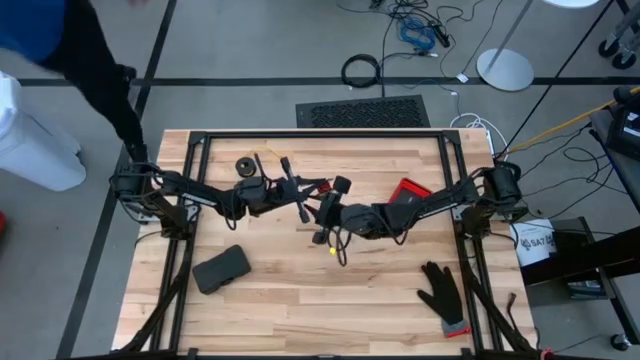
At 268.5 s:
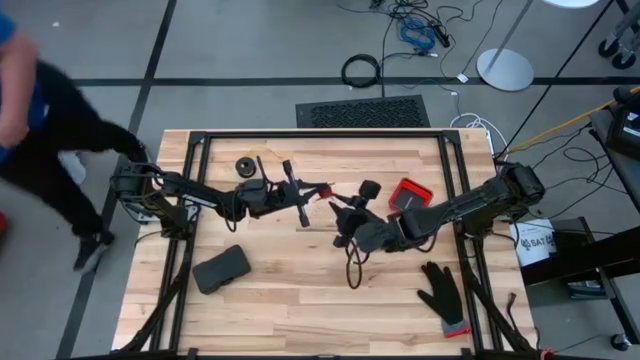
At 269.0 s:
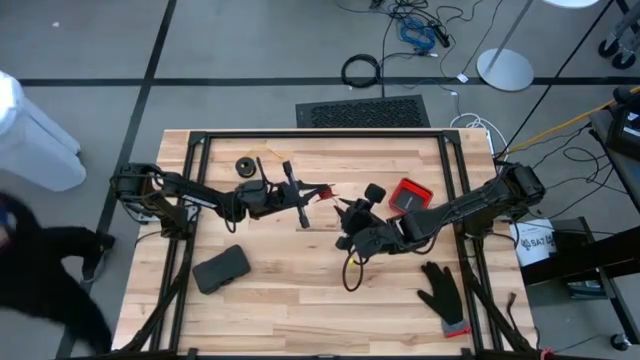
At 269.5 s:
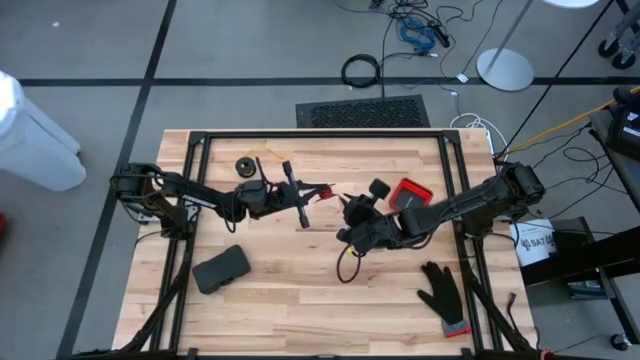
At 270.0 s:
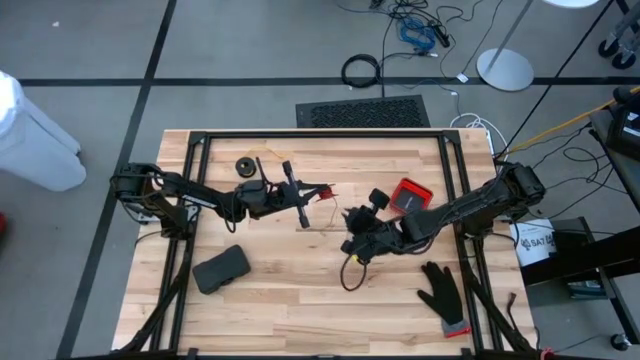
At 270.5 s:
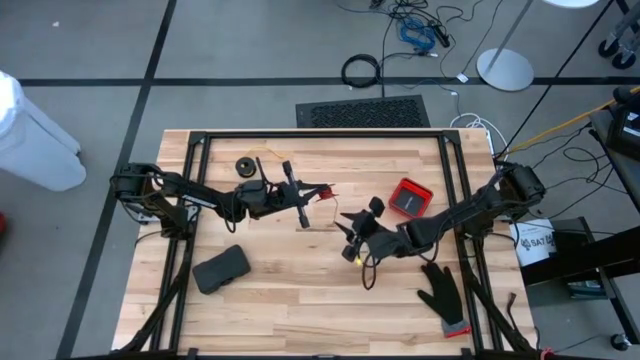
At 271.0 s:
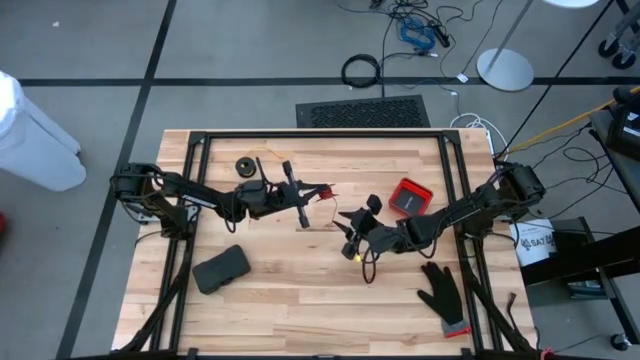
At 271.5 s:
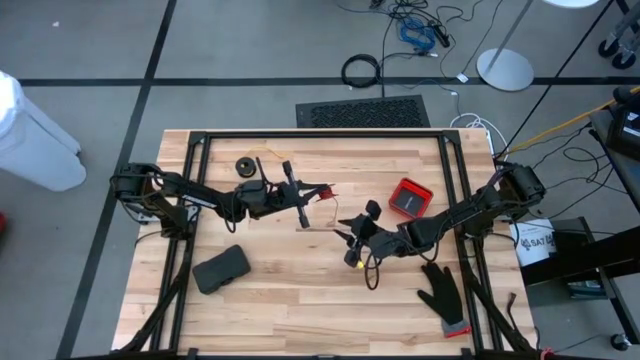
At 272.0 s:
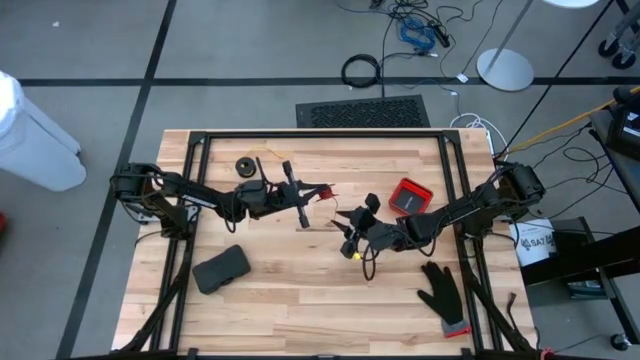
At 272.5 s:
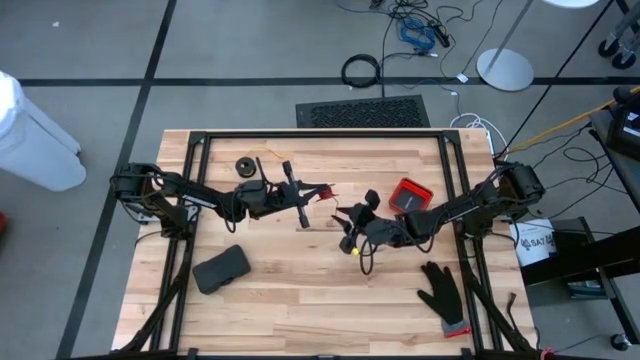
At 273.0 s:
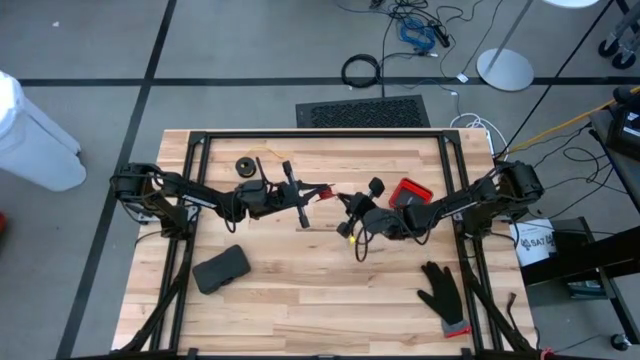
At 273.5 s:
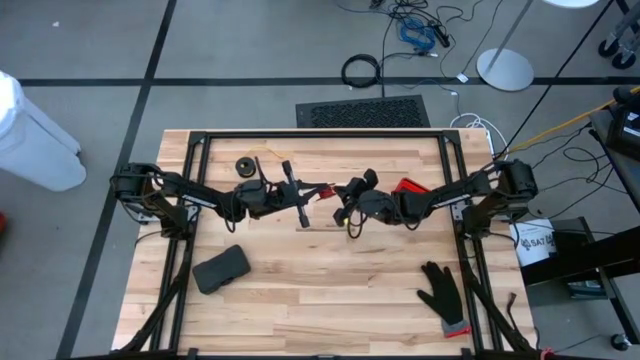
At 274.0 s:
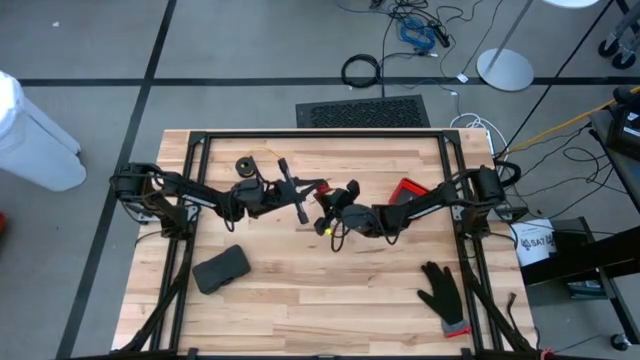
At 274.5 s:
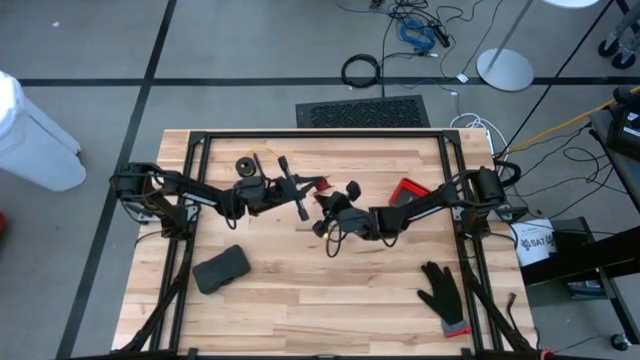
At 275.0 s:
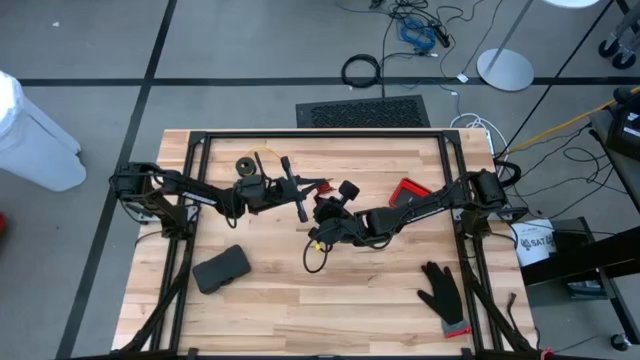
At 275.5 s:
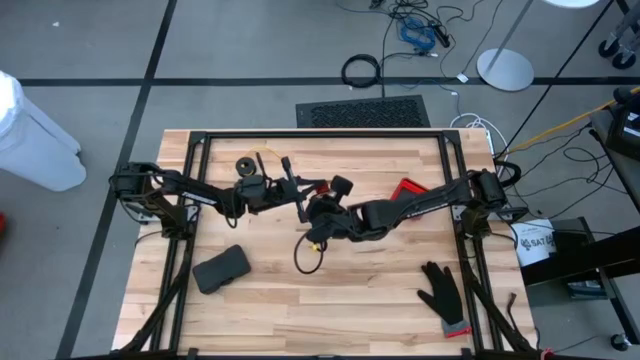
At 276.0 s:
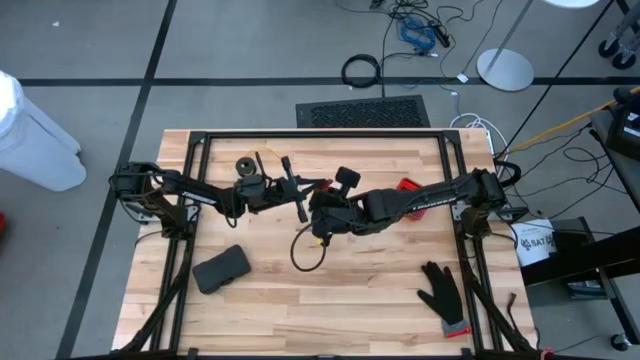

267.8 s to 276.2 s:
Task: Coil cords
Coil the red wire onto the black spool

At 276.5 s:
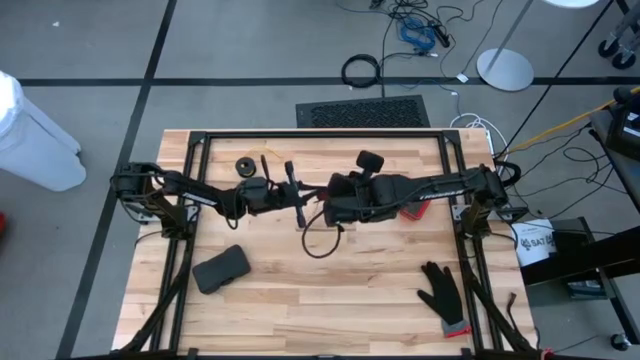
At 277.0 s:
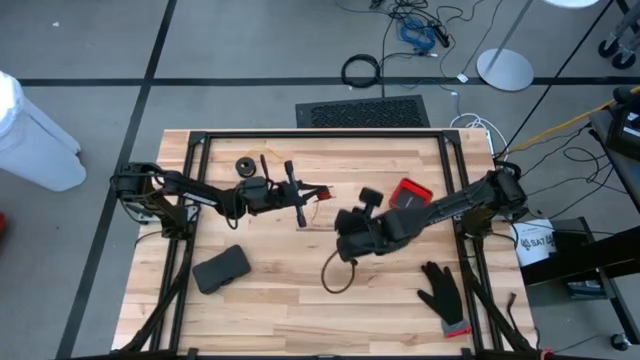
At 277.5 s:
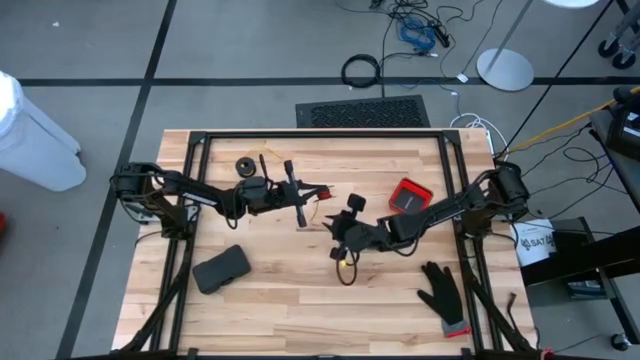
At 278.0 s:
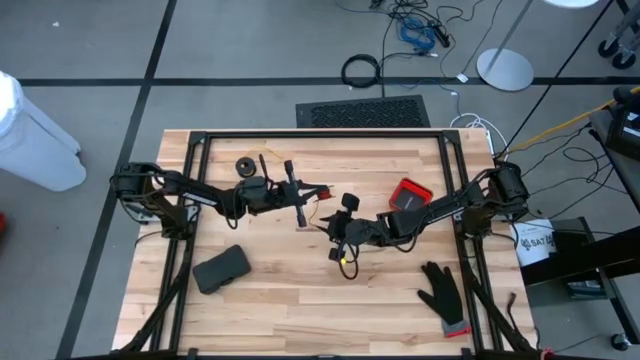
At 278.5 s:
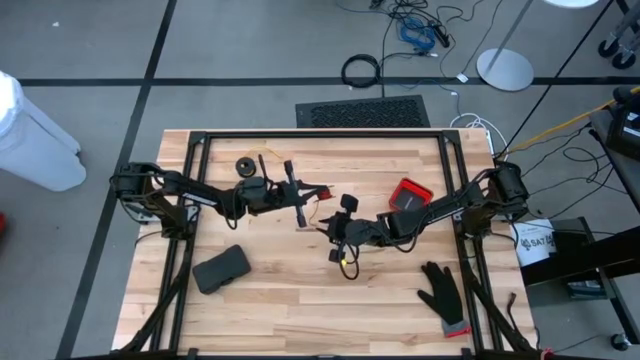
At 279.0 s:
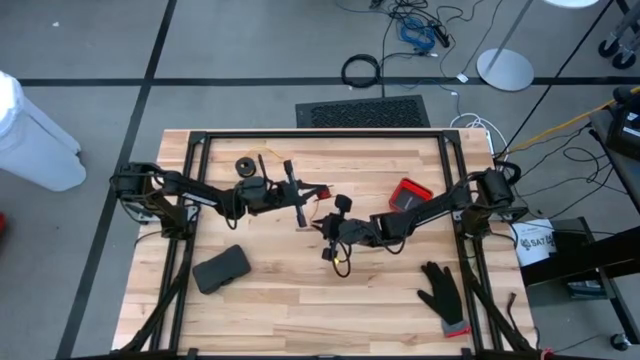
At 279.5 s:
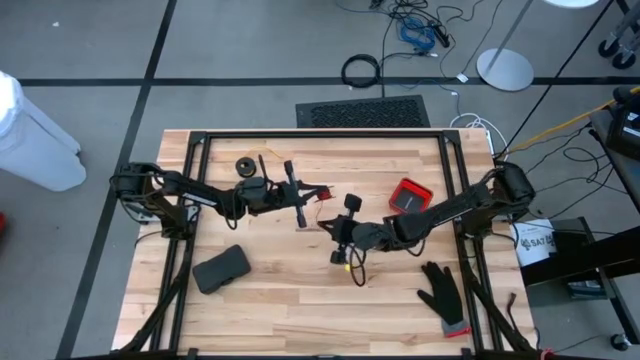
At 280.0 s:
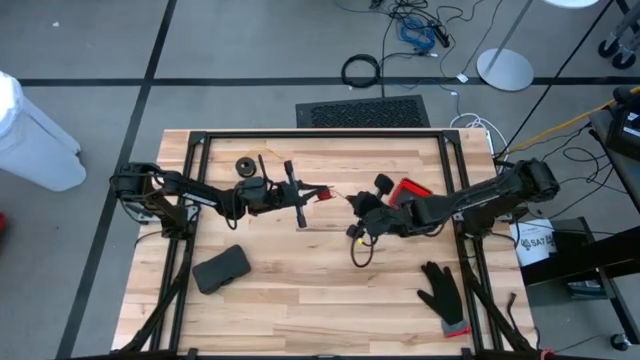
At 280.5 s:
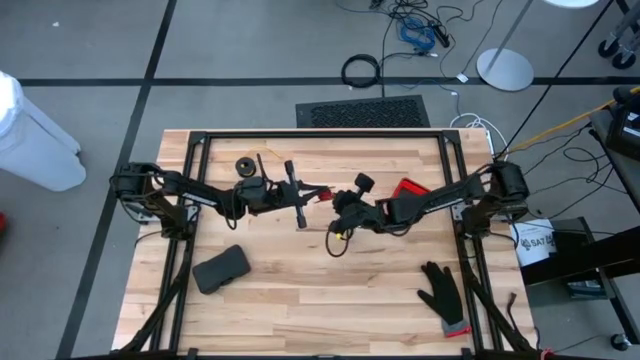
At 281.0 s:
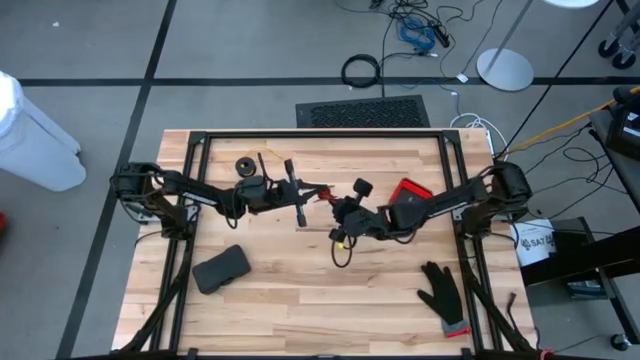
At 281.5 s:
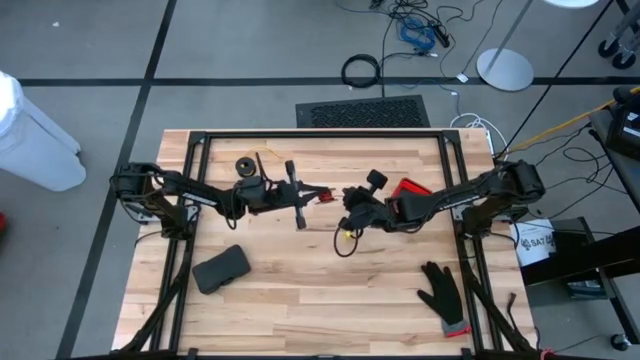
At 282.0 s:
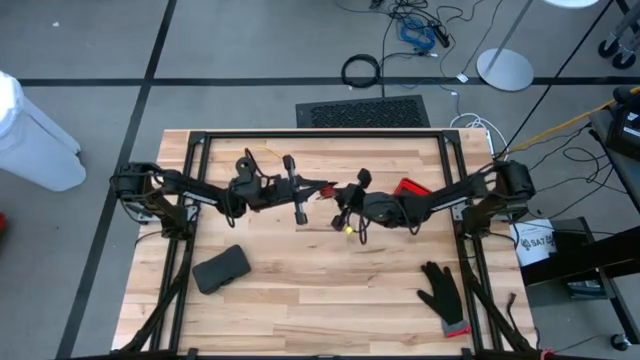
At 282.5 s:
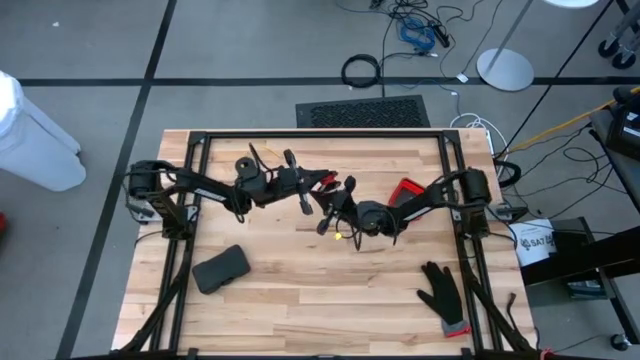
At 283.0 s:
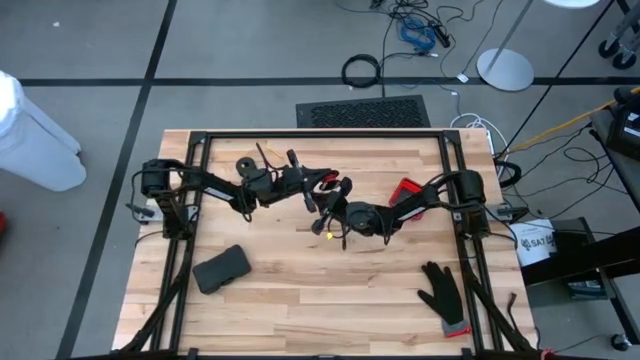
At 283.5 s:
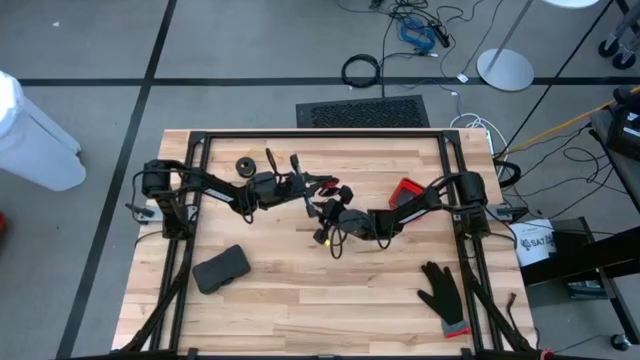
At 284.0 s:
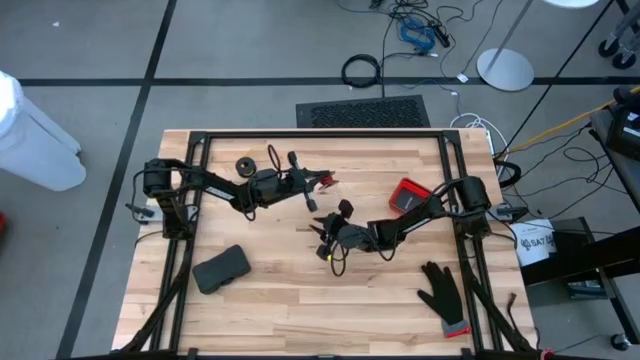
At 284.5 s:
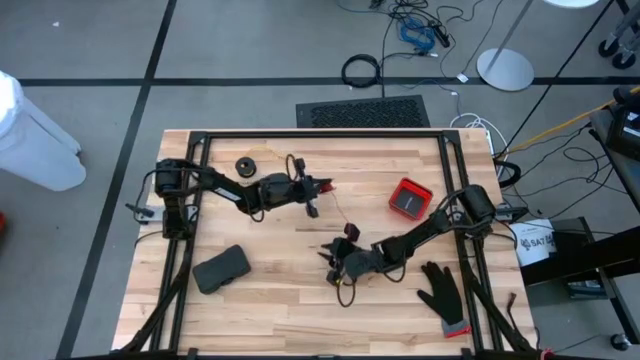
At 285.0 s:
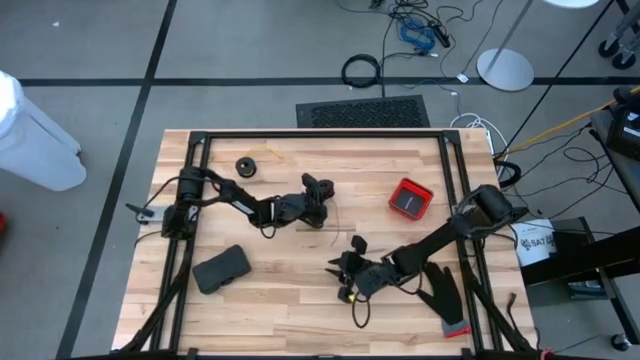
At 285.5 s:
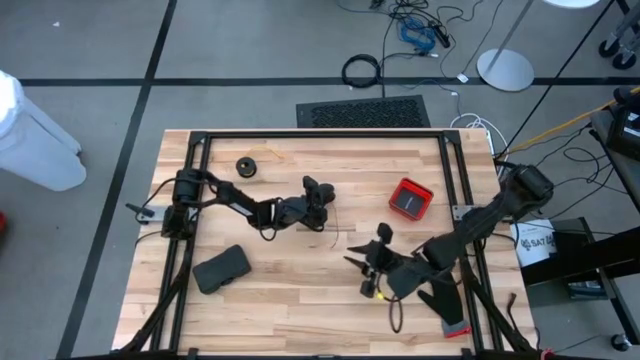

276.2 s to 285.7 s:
Coil the red wire onto the black spool

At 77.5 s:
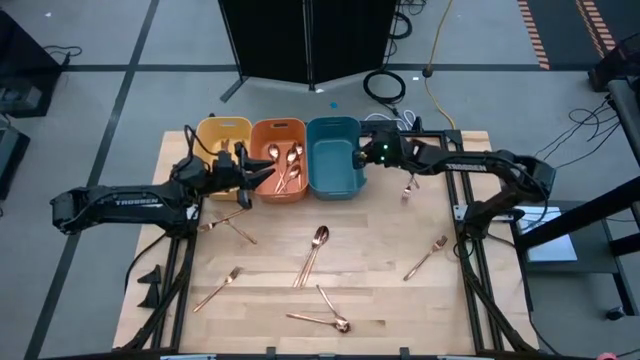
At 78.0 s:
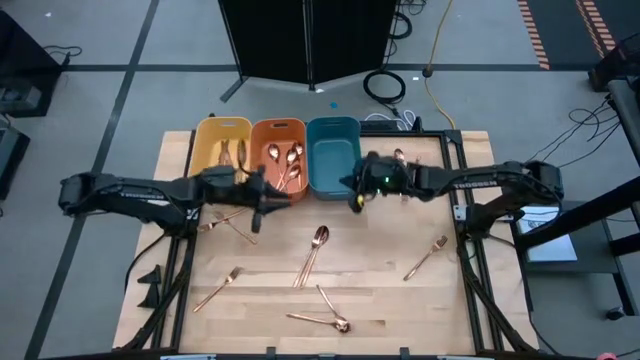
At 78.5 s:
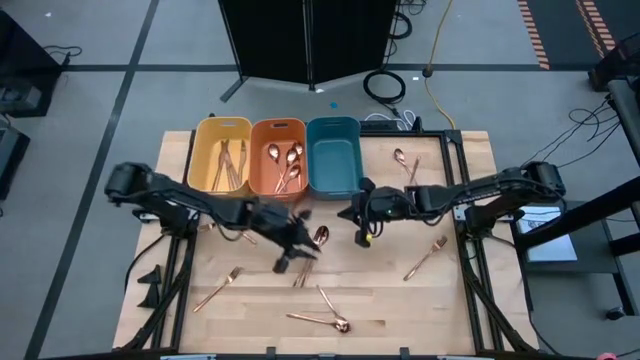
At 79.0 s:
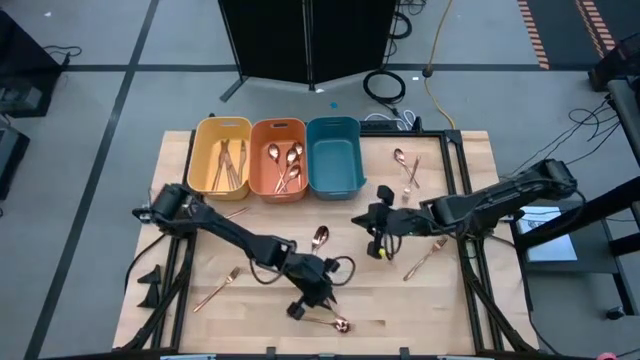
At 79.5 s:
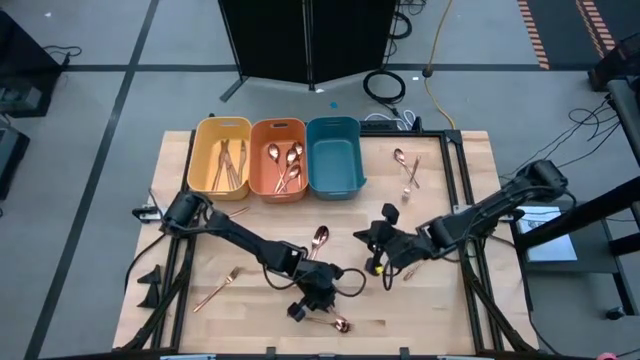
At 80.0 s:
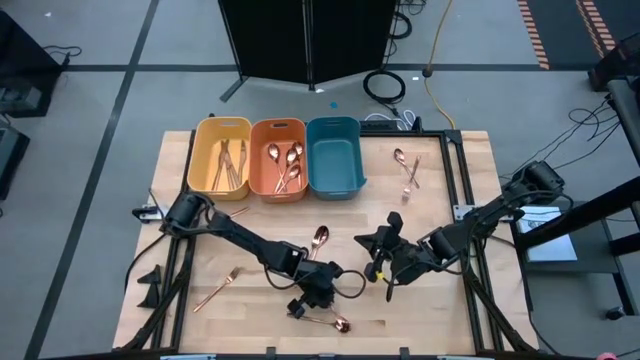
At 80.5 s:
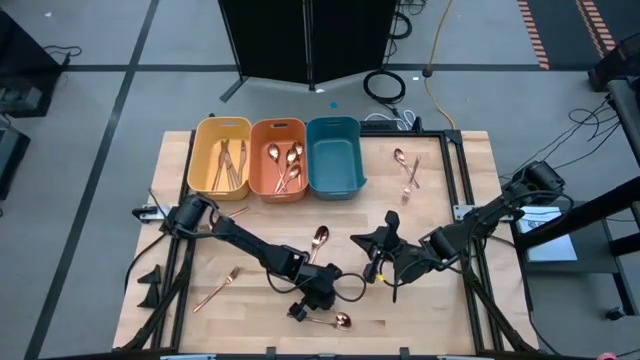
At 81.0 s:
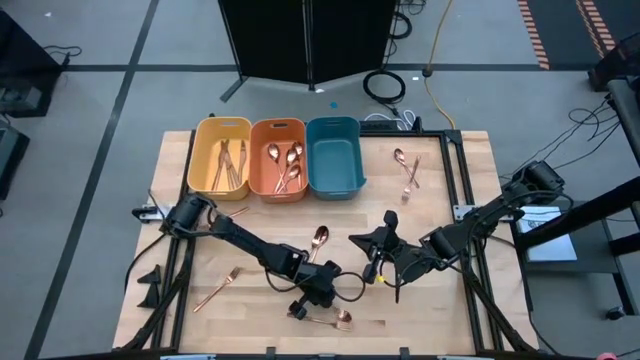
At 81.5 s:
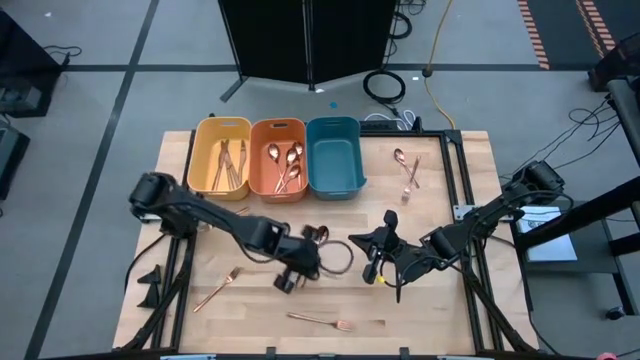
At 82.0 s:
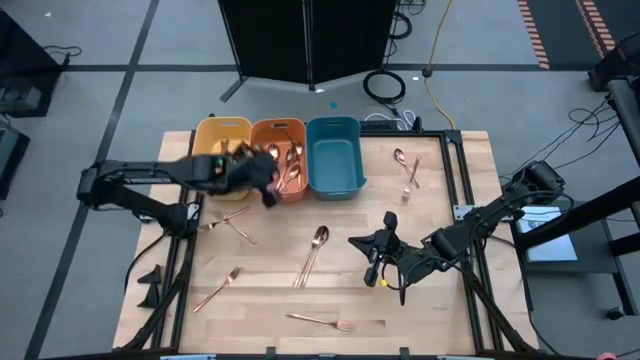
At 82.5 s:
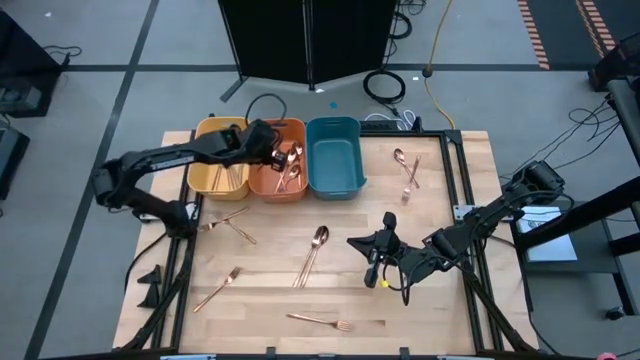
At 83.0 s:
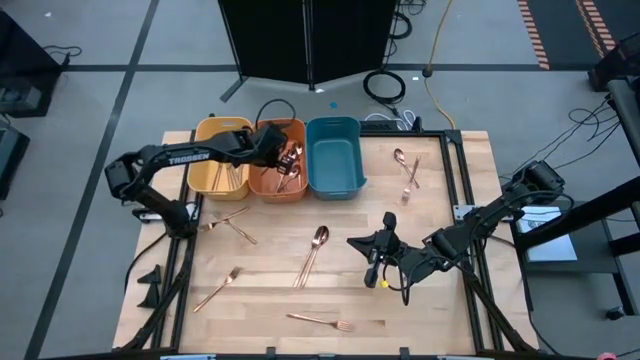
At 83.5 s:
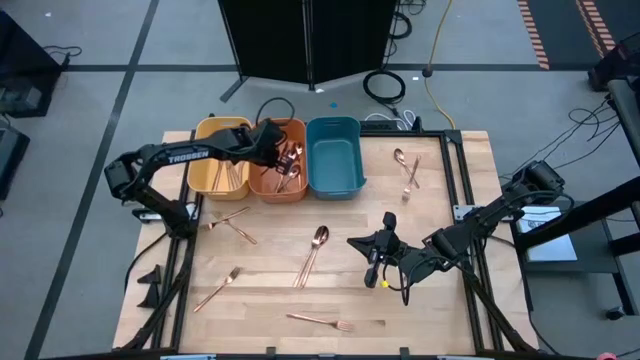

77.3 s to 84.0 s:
Task: Sort silverware
Put the gold spoon into the orange bin
